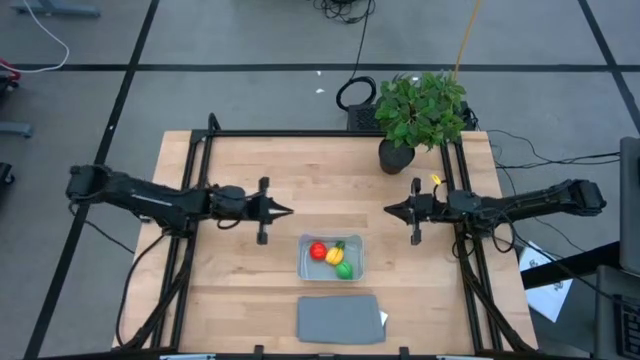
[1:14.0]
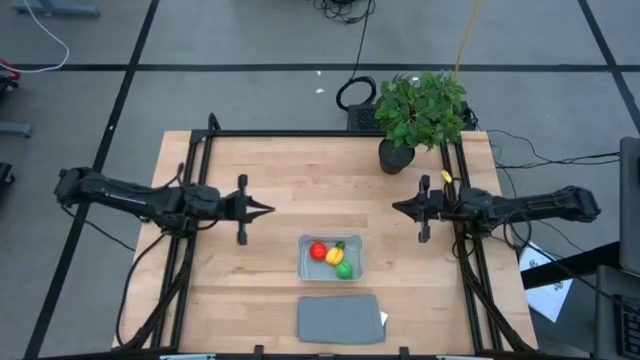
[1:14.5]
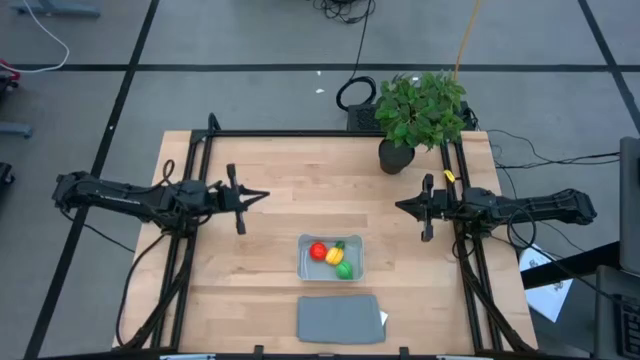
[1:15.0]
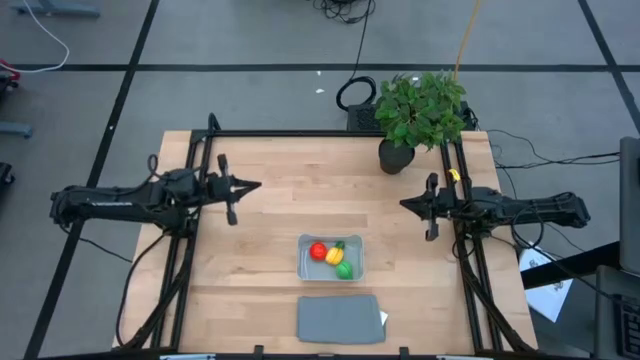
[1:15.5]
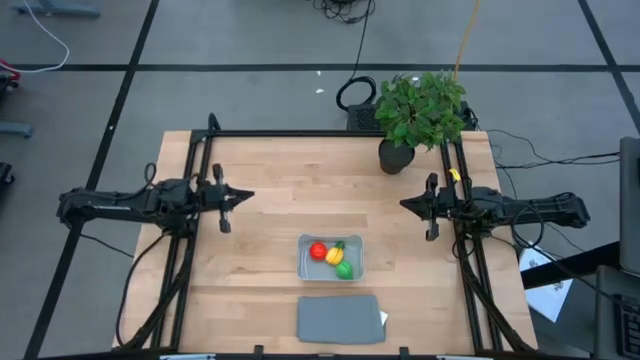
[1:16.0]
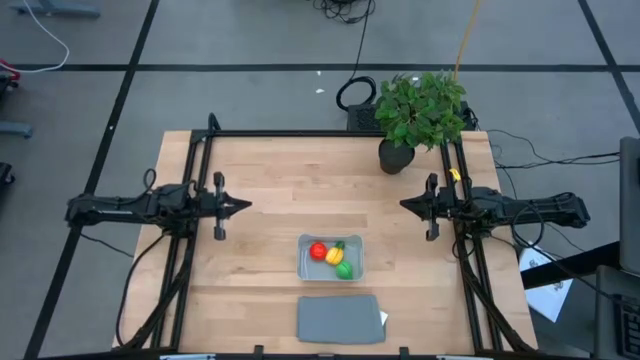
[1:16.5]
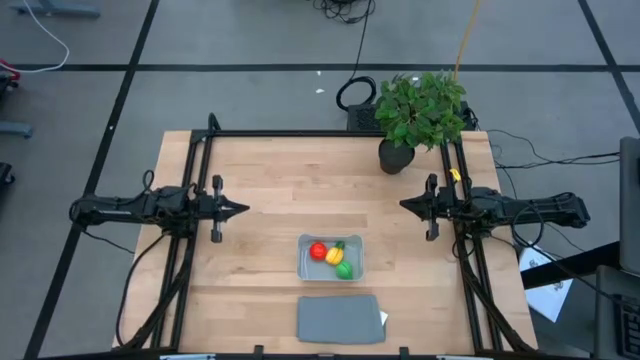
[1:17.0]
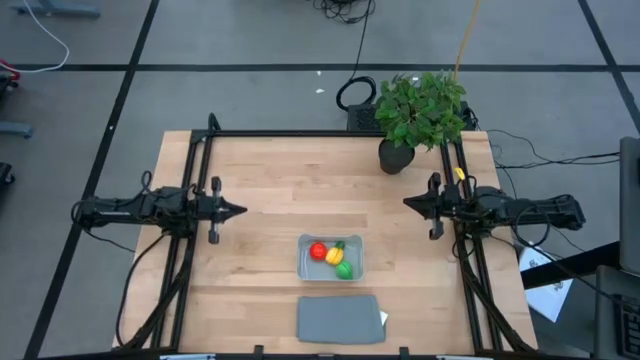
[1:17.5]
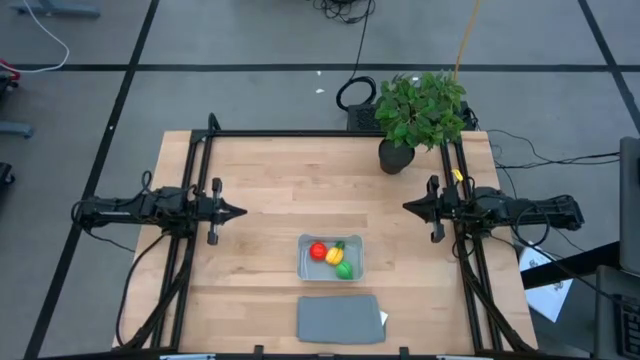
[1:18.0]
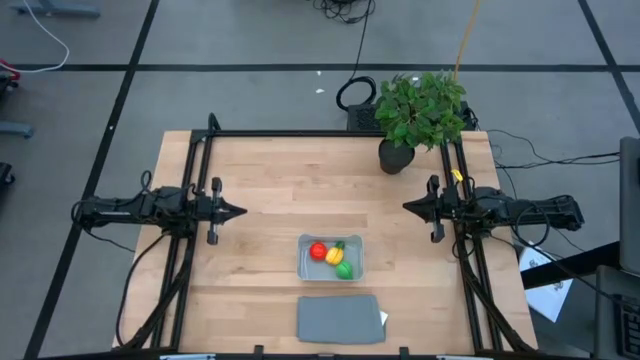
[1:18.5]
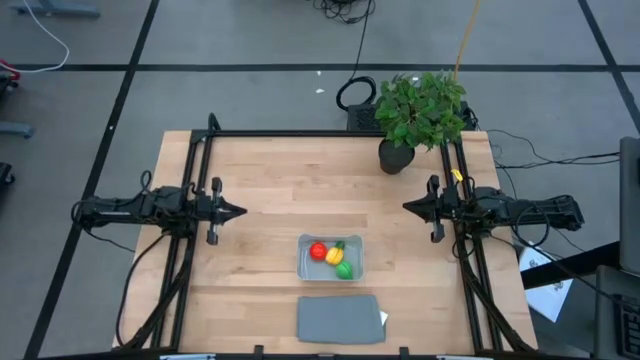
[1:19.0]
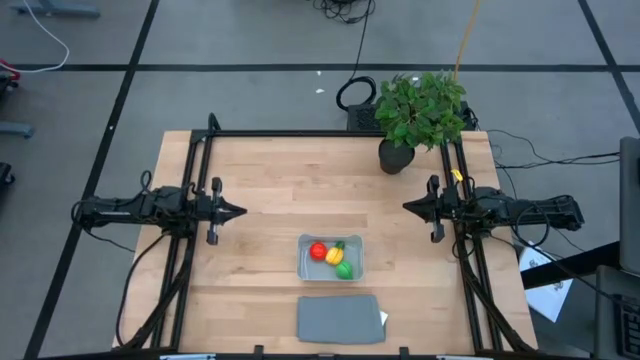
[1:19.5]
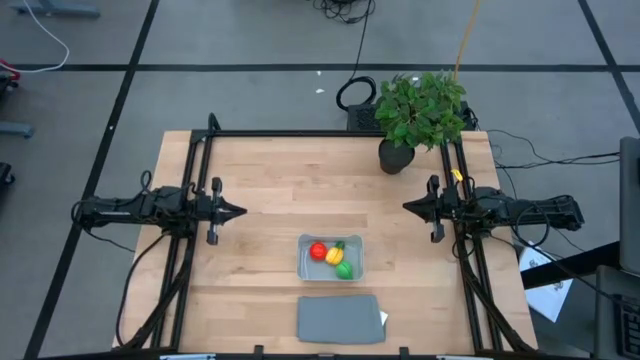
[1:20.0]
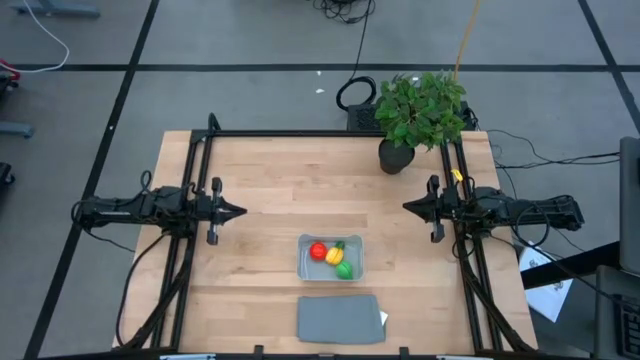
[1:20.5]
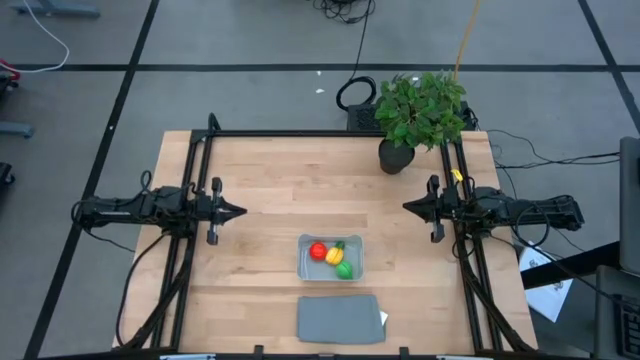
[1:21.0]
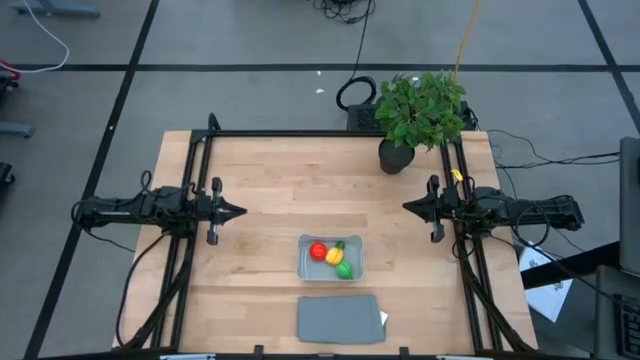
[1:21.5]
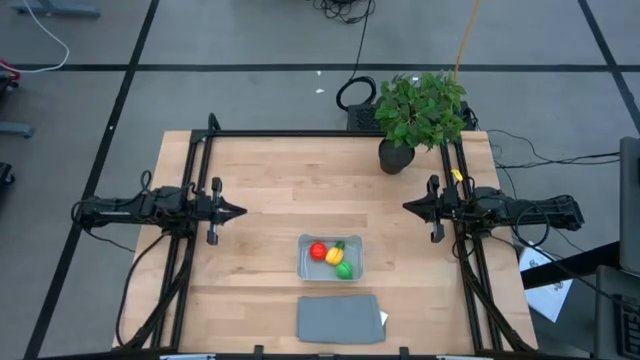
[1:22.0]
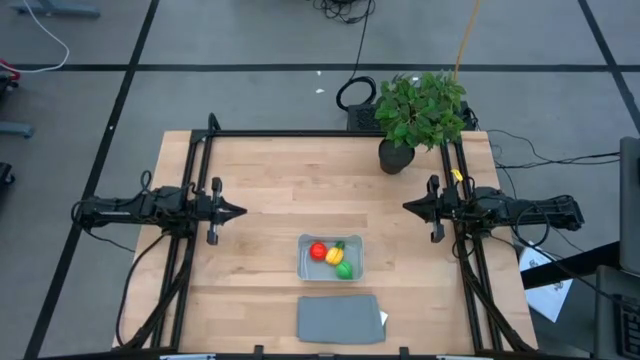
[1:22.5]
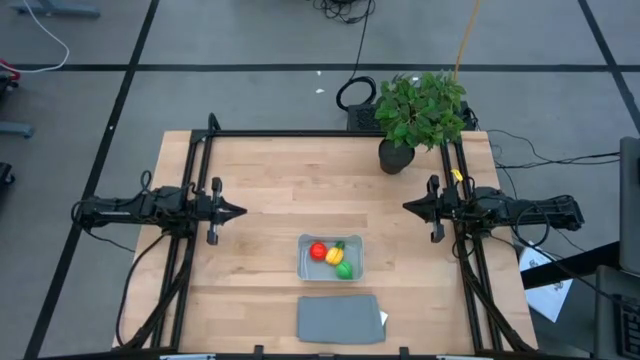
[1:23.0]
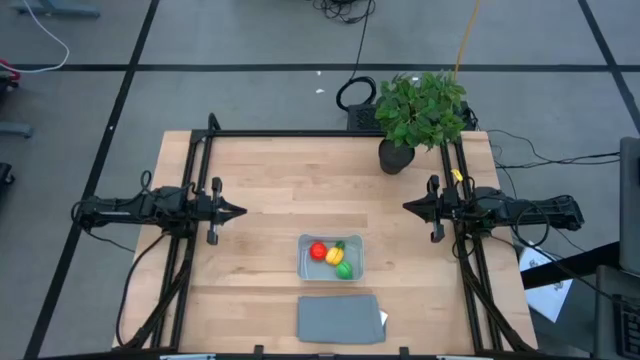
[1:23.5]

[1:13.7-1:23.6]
Task: Pick and placing Produce into tupperware
Return to Home Position

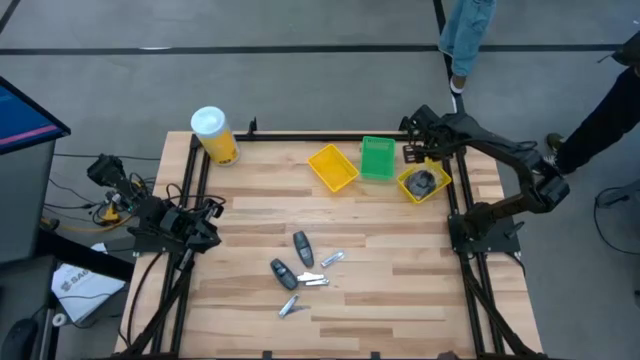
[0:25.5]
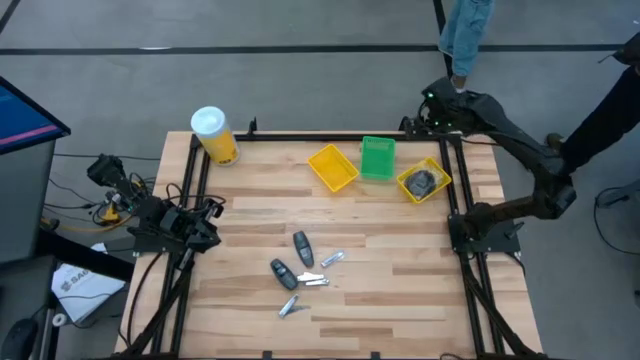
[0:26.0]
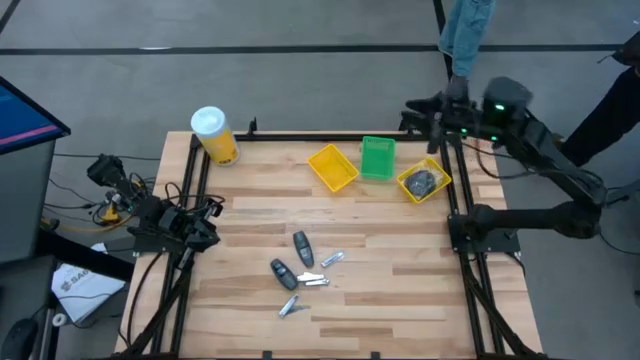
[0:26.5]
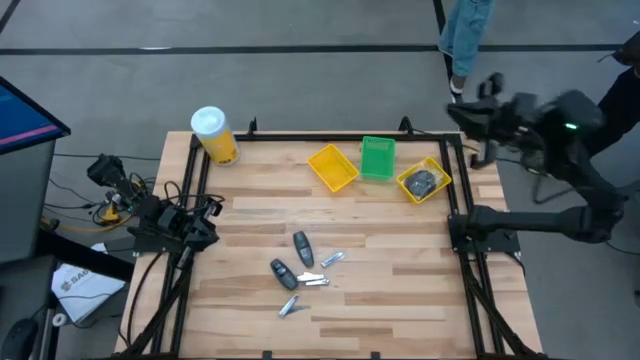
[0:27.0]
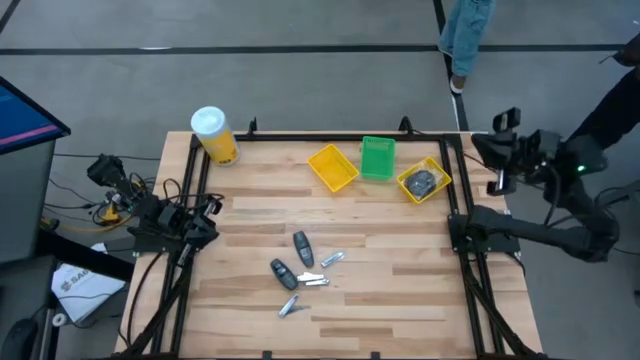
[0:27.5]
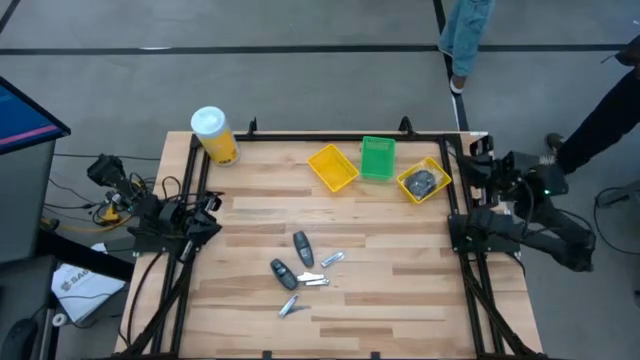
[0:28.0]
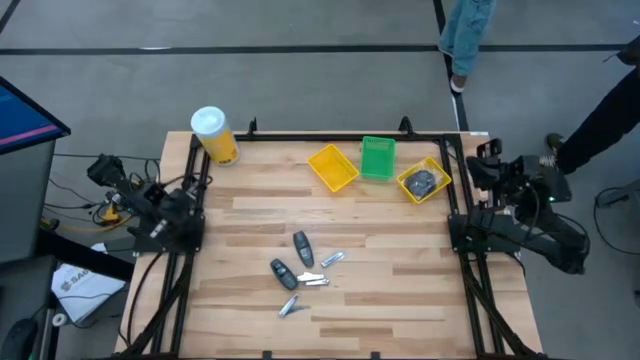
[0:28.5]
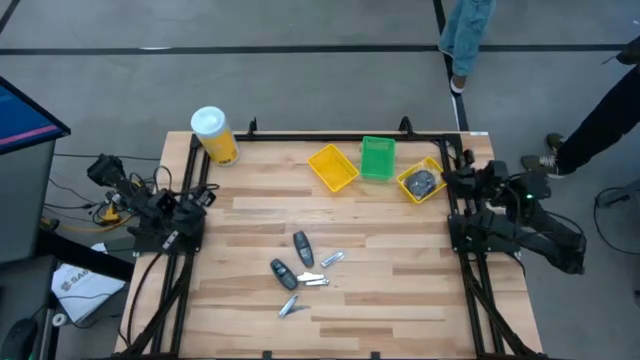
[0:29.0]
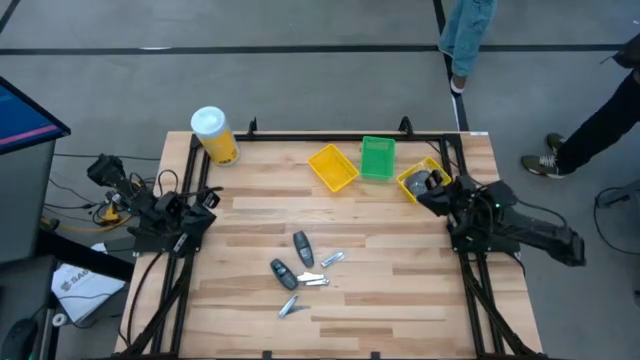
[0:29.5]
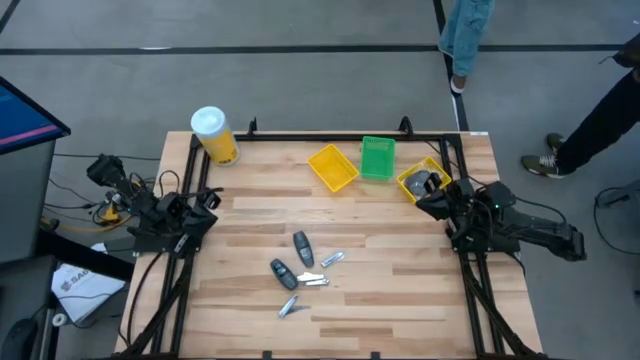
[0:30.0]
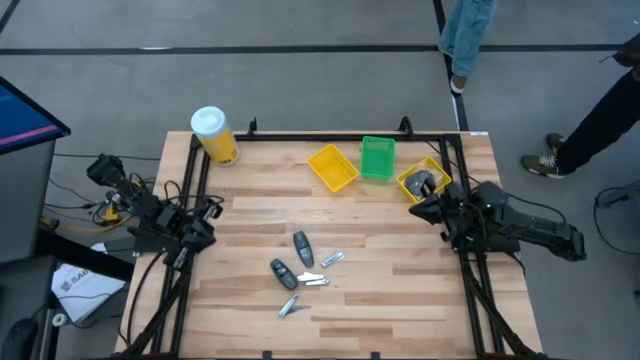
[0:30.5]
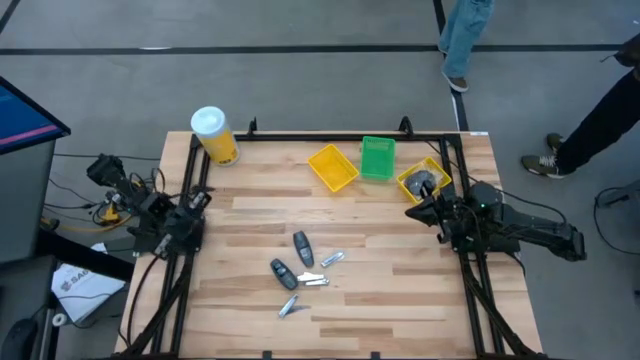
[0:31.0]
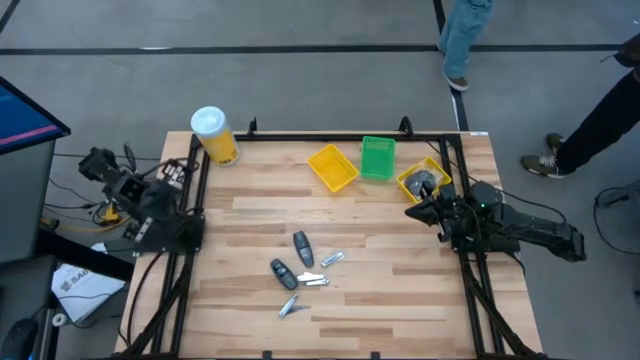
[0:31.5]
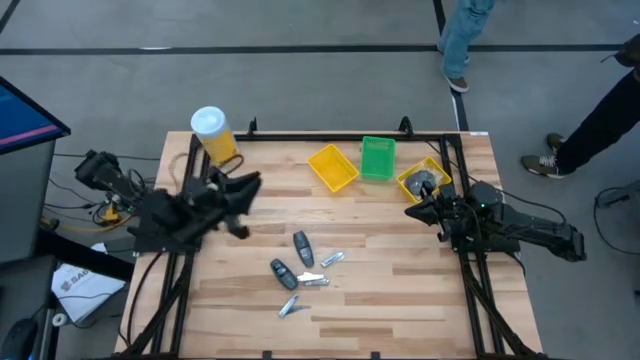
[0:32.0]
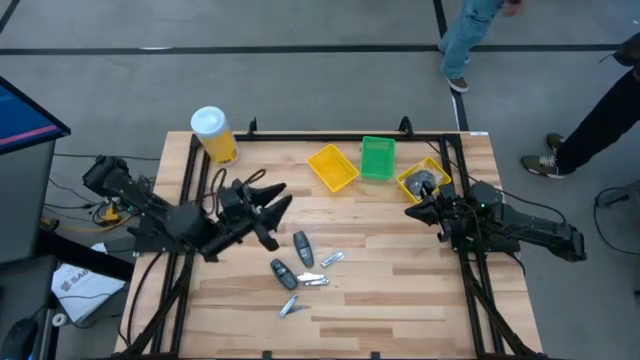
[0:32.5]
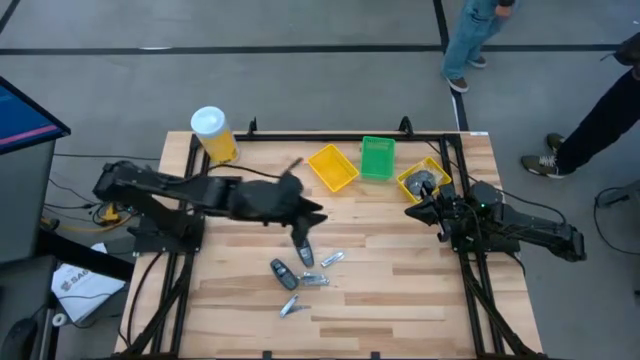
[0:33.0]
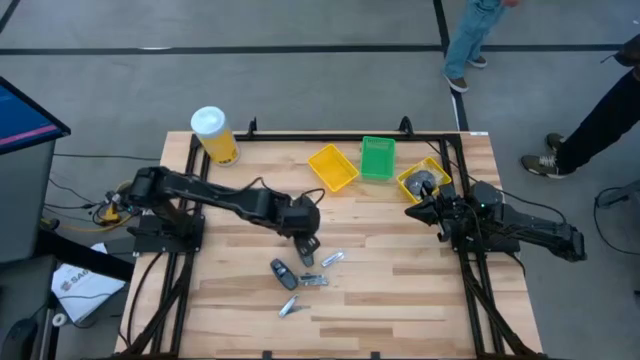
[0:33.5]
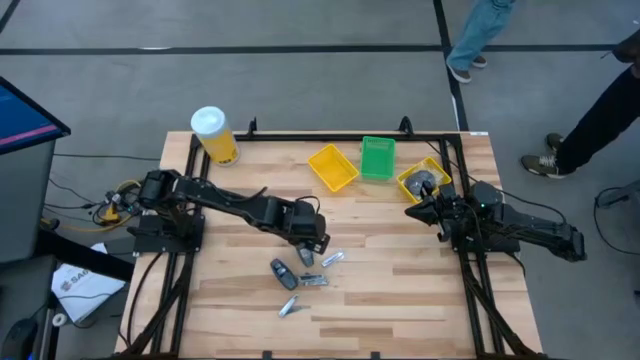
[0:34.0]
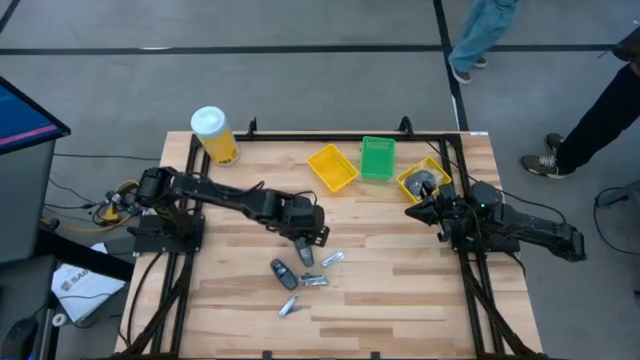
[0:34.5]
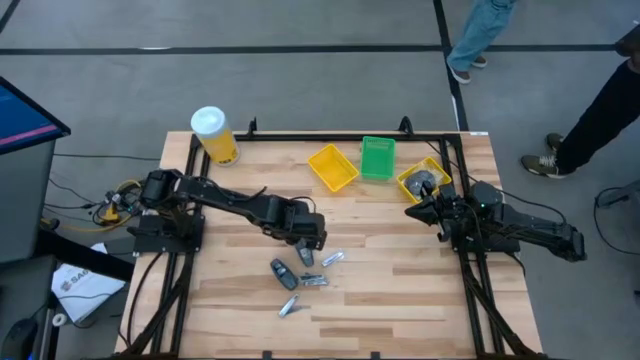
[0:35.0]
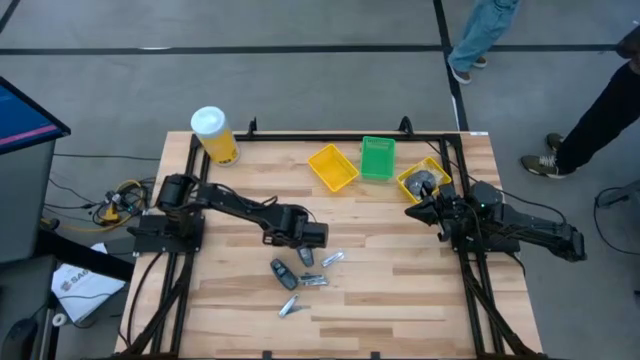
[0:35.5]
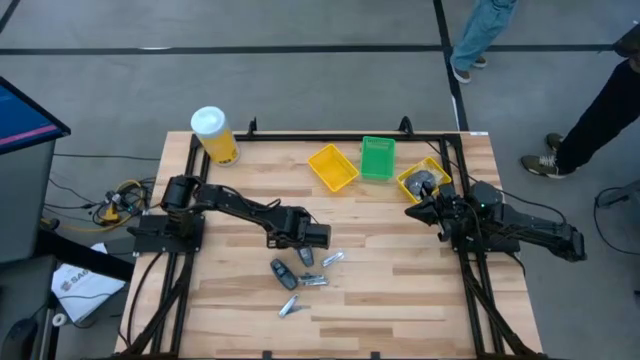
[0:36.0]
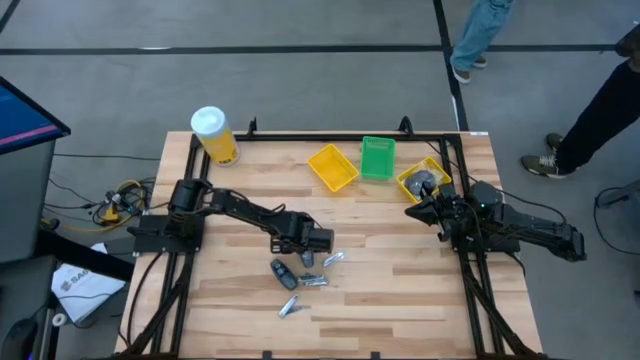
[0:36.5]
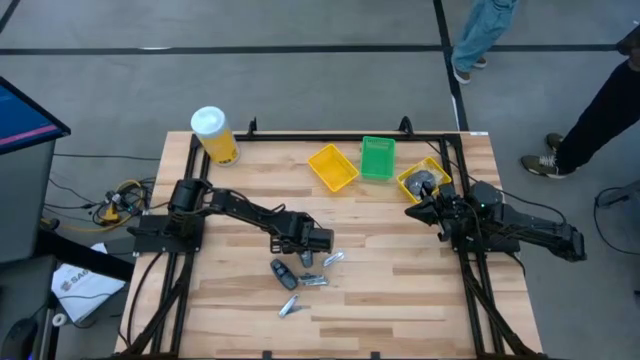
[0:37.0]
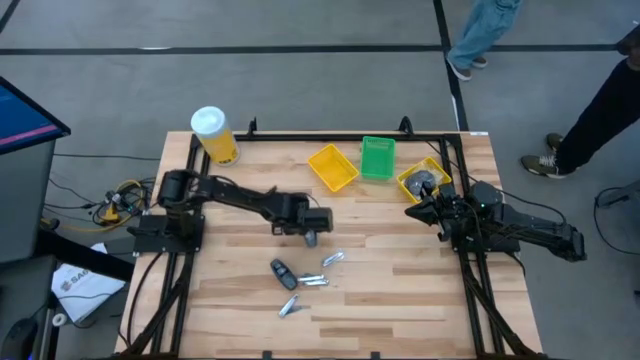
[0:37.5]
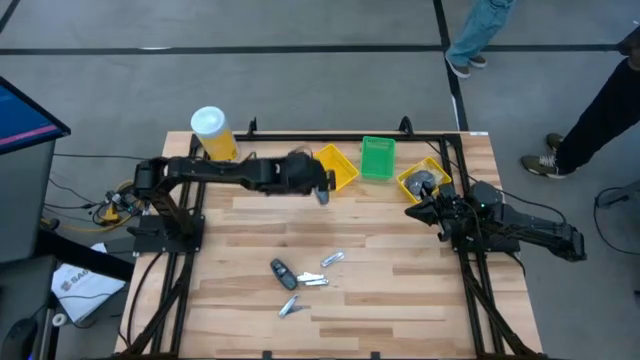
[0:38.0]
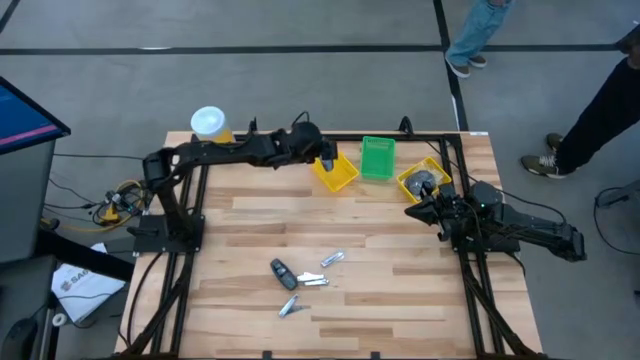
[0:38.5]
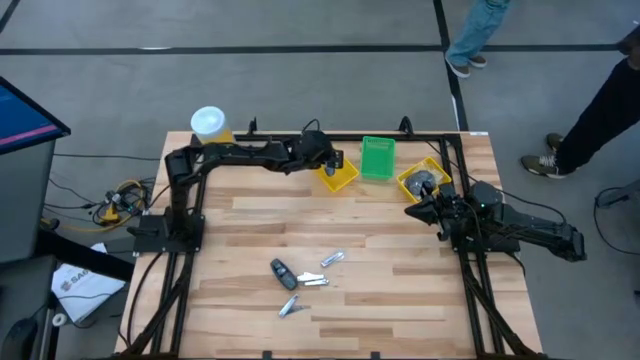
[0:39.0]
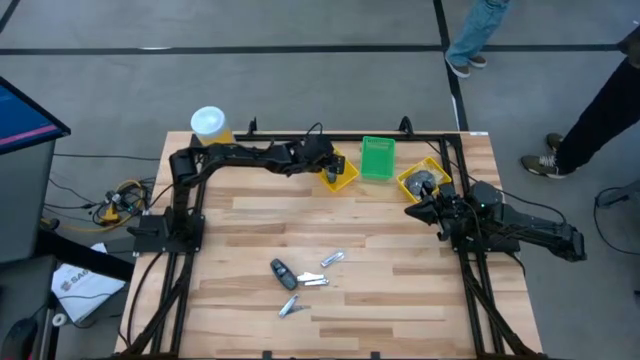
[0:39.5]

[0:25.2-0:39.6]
Task: Pick & Place Travel size toiletries
Put the black deodorant into the left yellow basket
